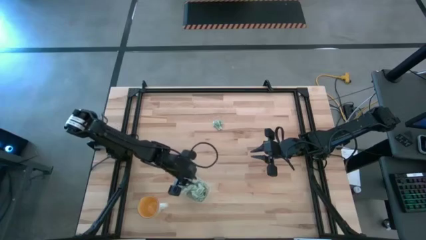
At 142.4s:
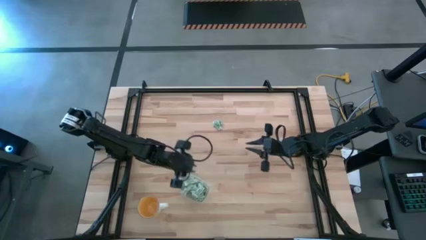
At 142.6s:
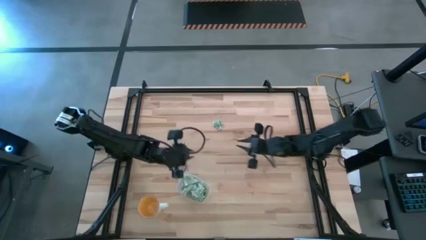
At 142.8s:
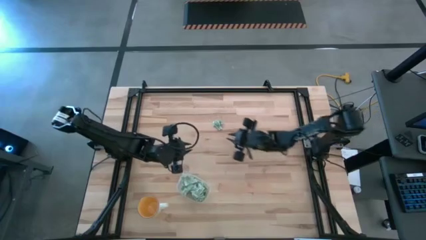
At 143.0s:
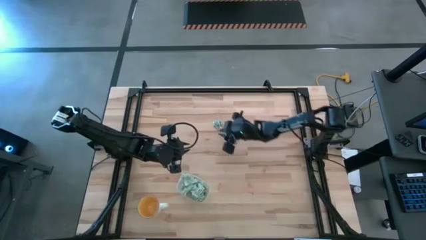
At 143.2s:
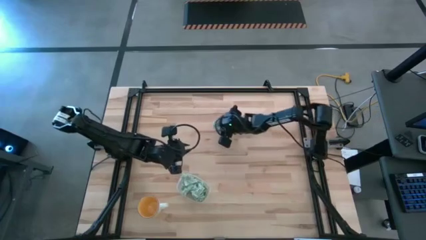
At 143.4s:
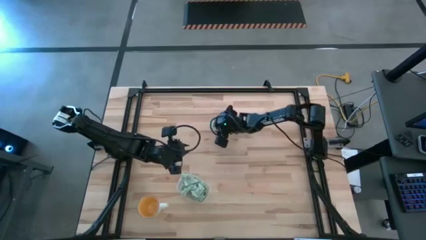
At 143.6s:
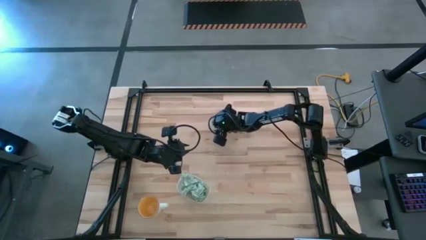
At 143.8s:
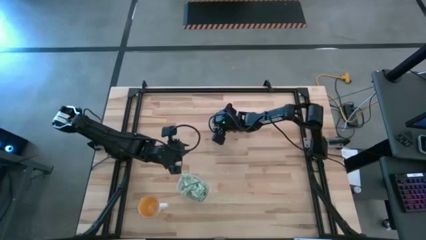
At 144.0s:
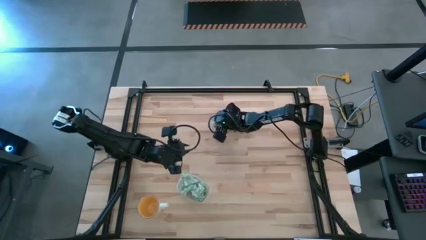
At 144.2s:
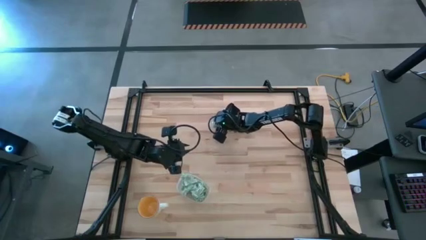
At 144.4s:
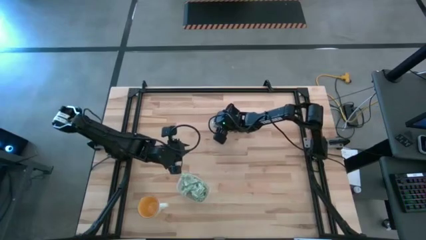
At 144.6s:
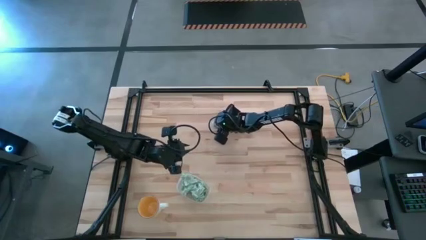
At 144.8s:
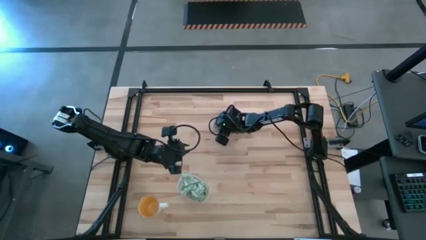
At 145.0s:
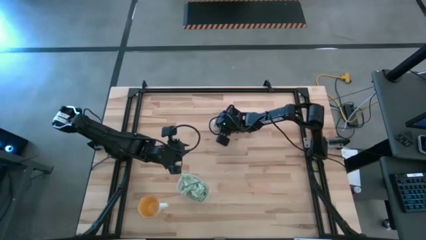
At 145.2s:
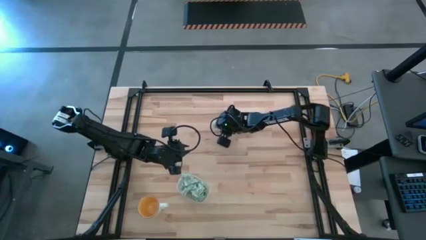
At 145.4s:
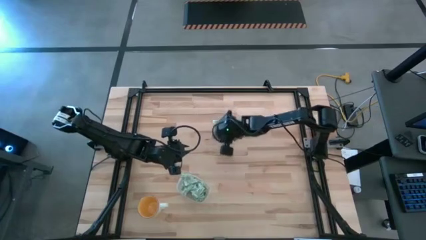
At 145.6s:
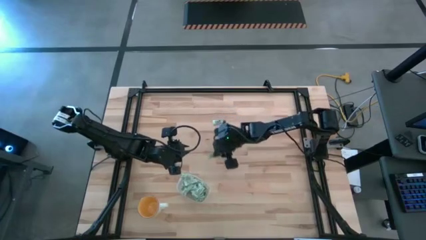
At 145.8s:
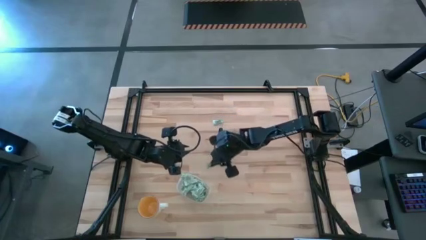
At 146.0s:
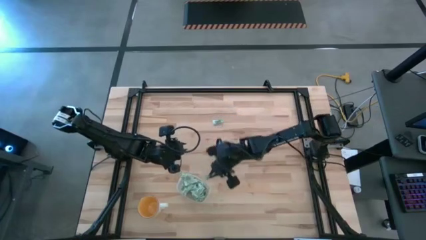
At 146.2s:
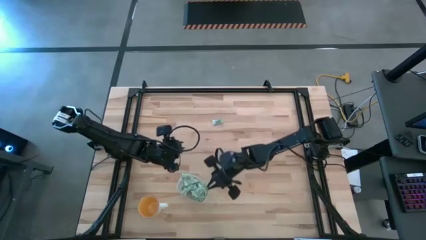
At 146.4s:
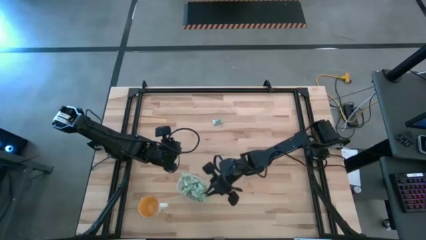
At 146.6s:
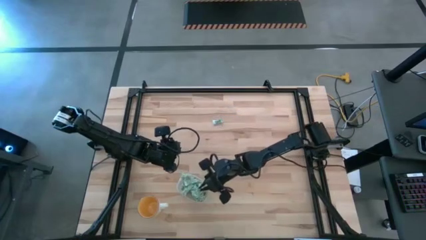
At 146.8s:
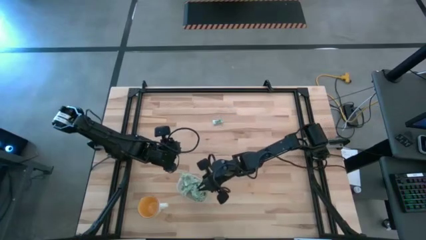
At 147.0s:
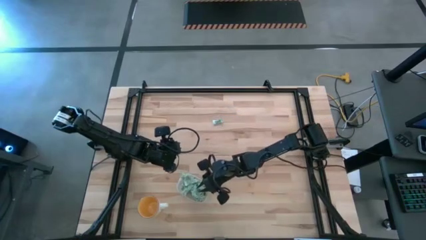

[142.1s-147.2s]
Task: Pick and place Stevia / Truvia into bins
Put the stevia packet into the transparent container

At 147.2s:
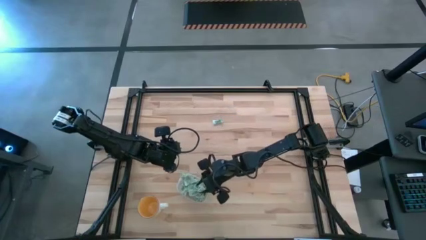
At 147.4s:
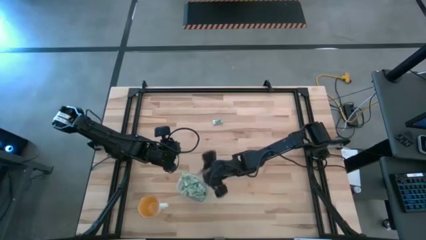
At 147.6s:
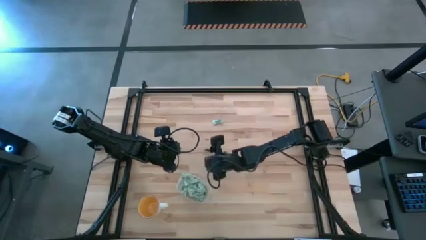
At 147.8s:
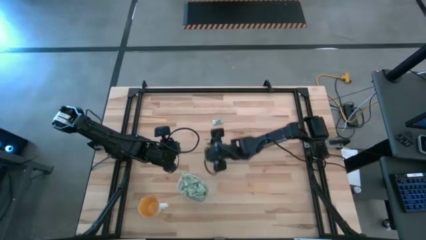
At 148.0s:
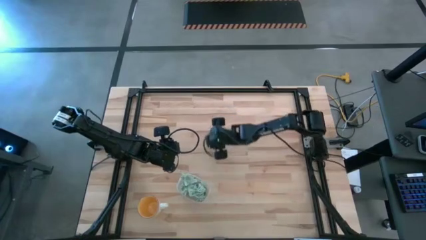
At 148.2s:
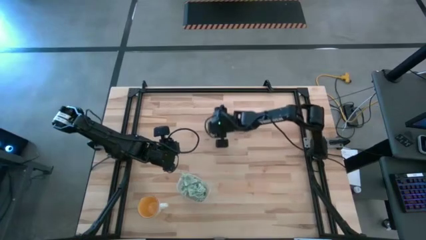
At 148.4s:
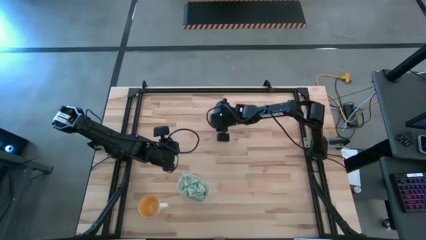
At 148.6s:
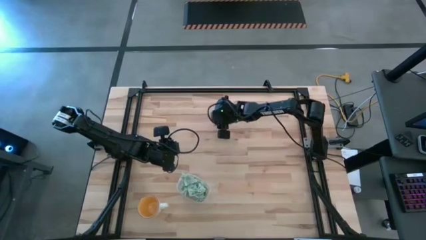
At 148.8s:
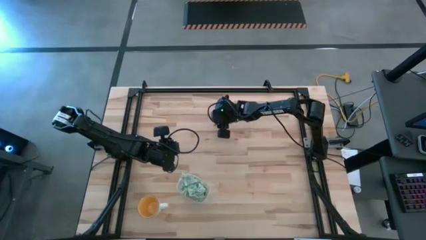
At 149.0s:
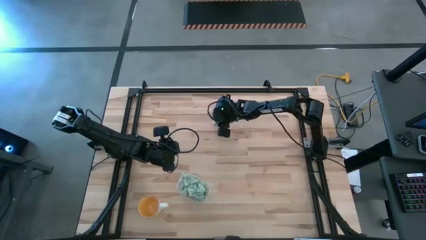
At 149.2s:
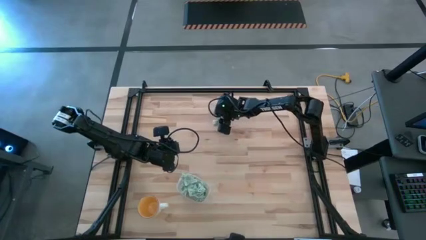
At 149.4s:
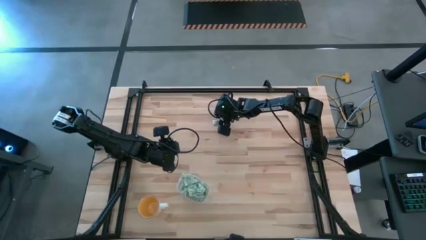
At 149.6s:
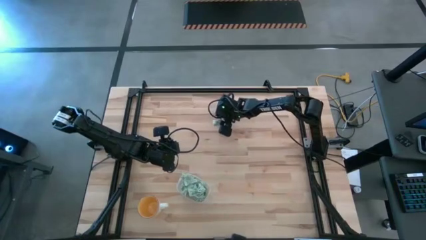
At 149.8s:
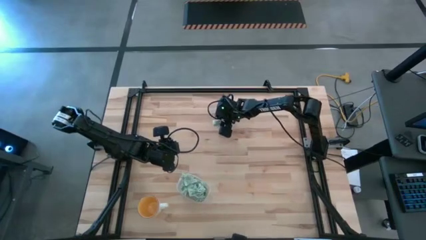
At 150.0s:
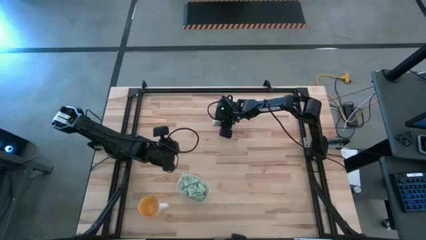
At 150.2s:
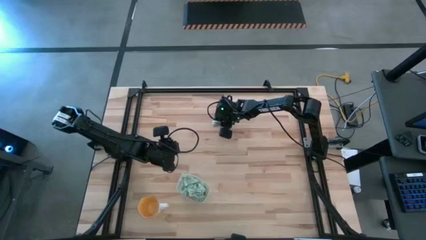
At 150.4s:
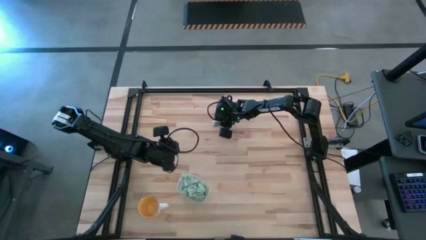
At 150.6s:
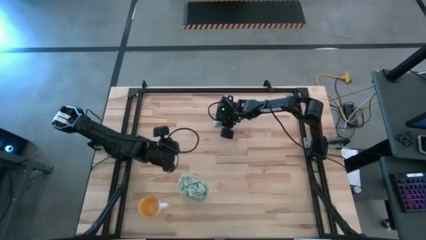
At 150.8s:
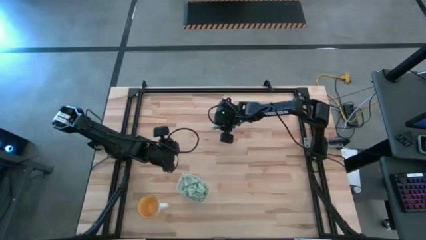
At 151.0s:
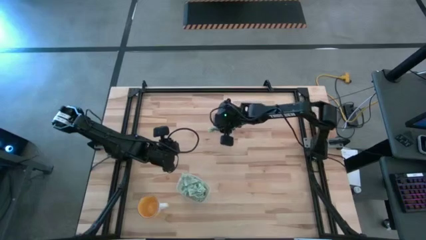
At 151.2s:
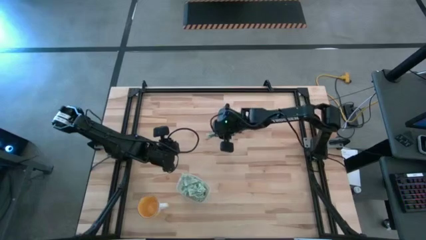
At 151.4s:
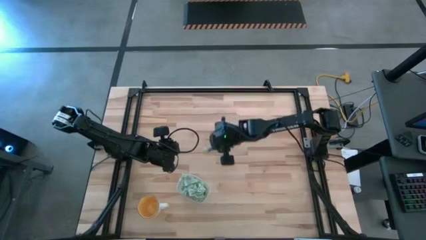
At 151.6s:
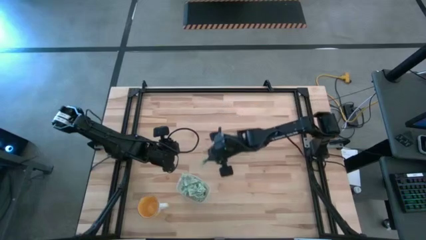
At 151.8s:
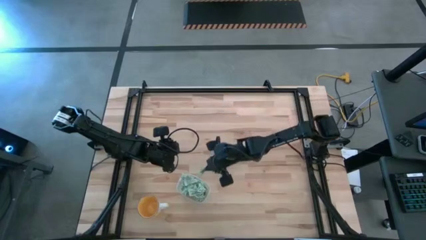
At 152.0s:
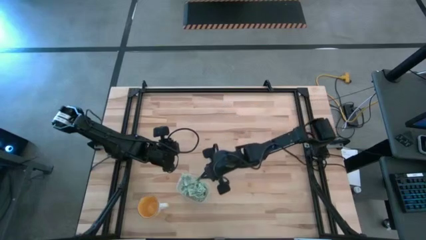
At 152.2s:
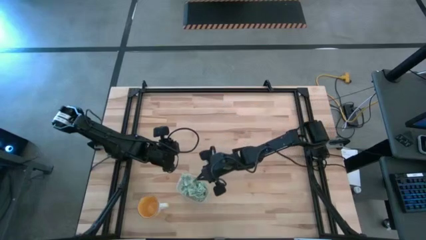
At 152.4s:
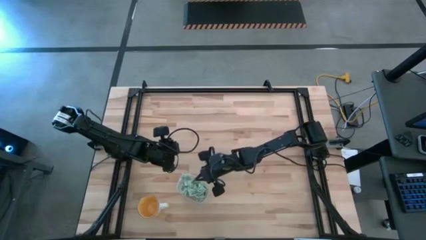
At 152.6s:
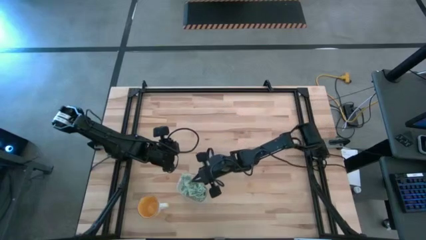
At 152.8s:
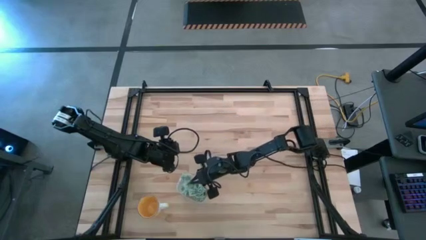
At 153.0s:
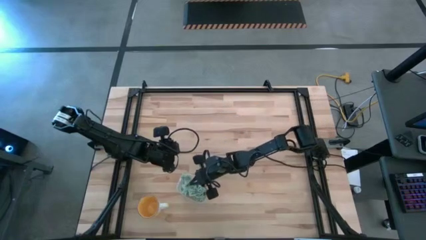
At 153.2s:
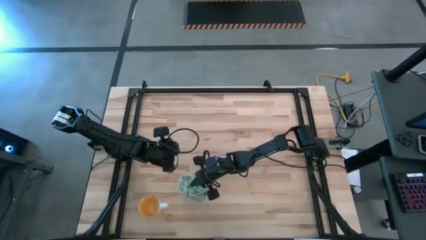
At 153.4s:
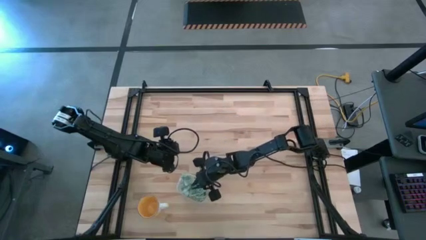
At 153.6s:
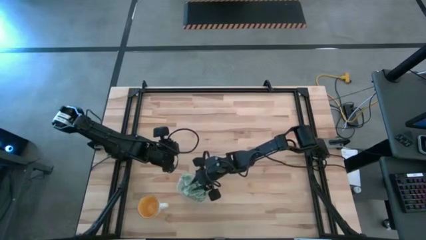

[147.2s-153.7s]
Put the stevia packet into the transparent container

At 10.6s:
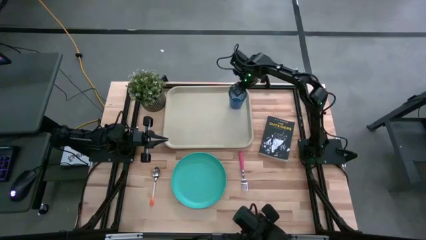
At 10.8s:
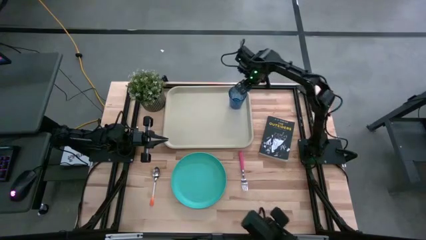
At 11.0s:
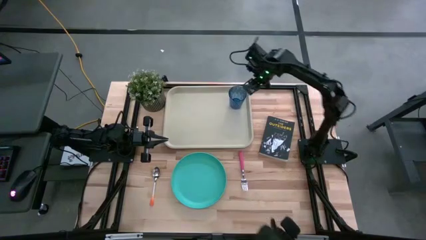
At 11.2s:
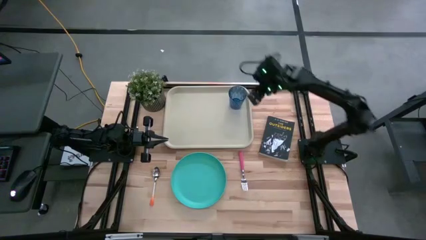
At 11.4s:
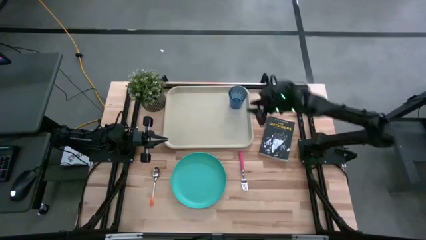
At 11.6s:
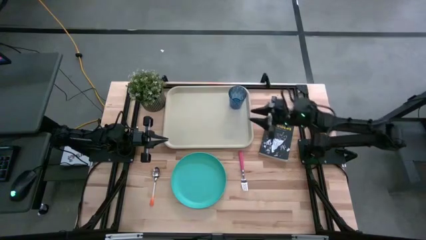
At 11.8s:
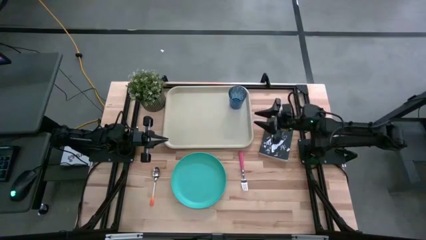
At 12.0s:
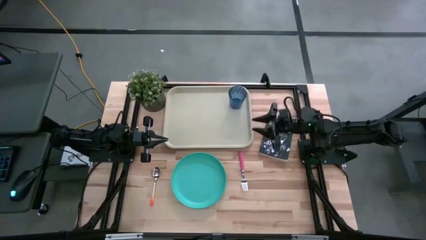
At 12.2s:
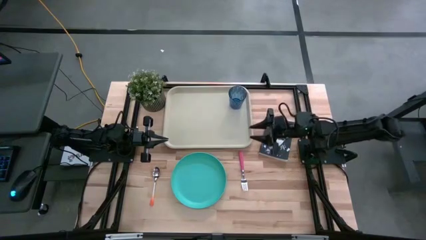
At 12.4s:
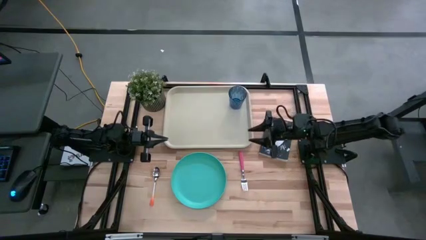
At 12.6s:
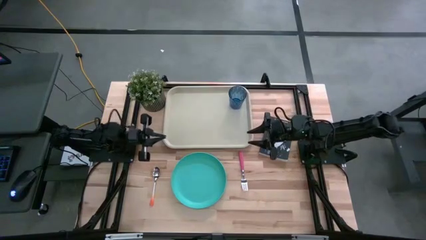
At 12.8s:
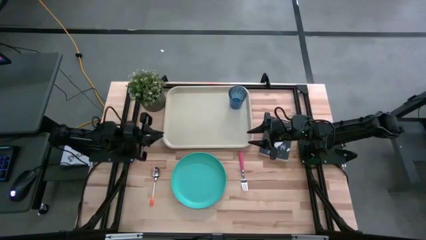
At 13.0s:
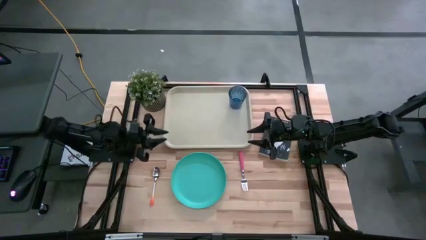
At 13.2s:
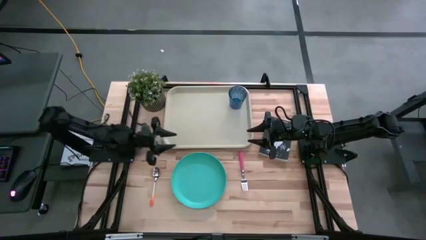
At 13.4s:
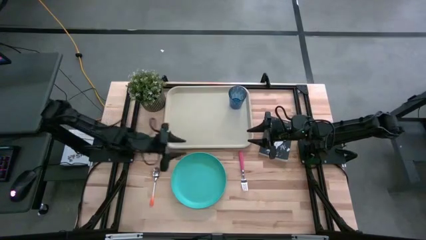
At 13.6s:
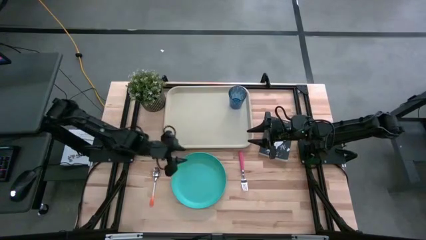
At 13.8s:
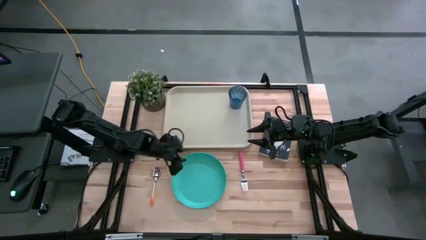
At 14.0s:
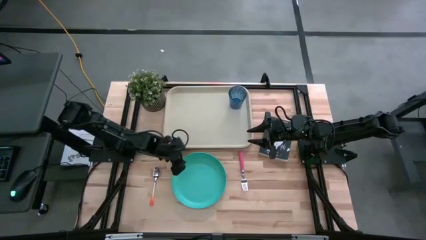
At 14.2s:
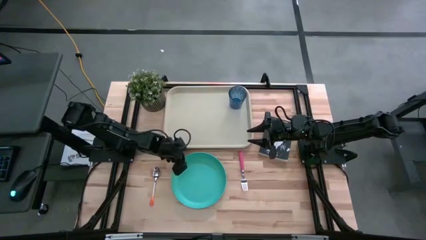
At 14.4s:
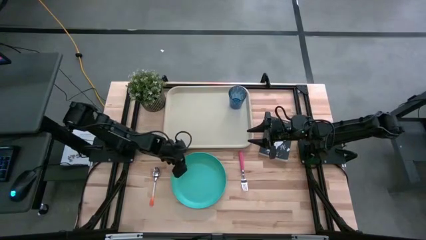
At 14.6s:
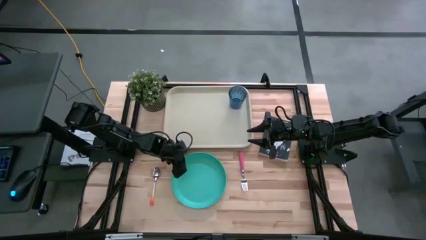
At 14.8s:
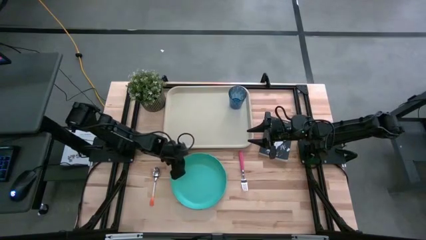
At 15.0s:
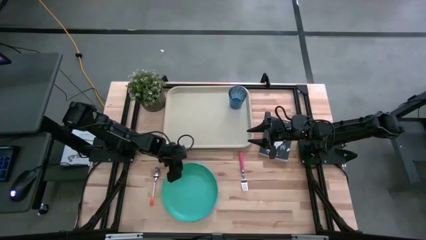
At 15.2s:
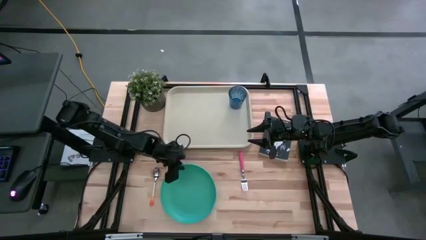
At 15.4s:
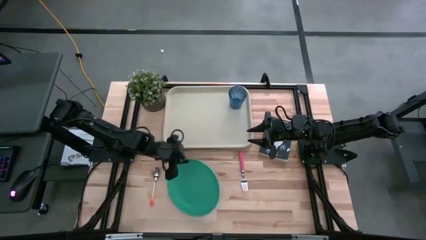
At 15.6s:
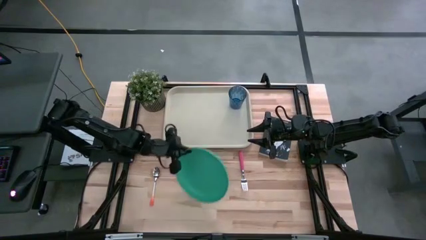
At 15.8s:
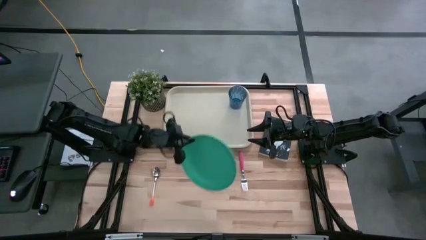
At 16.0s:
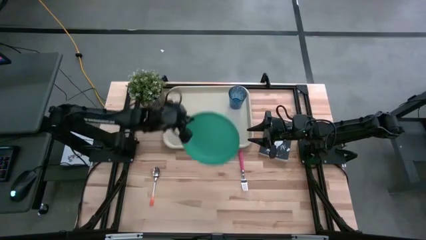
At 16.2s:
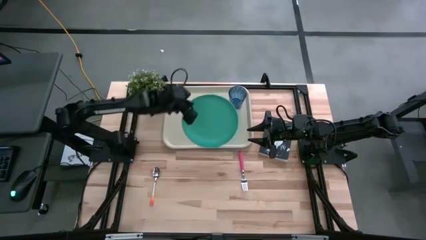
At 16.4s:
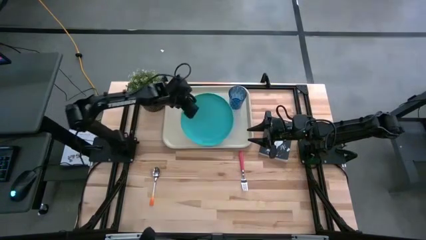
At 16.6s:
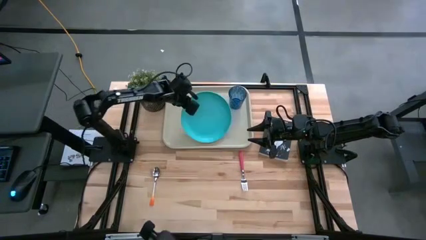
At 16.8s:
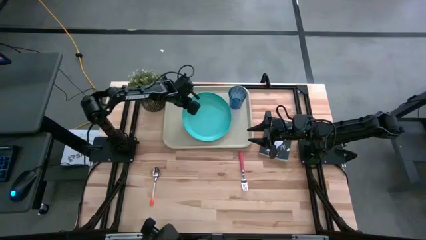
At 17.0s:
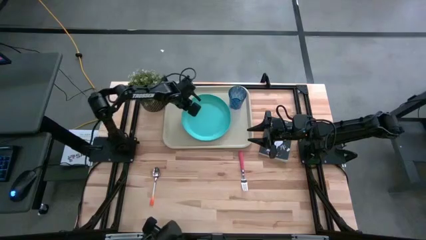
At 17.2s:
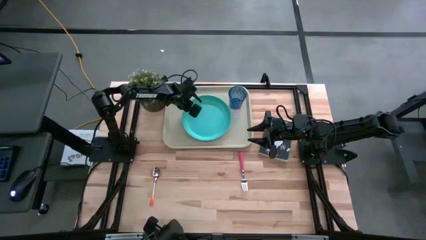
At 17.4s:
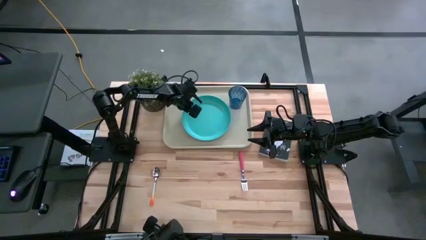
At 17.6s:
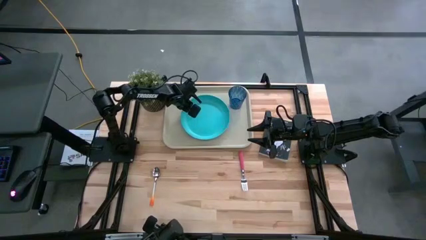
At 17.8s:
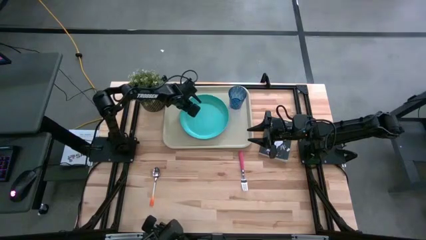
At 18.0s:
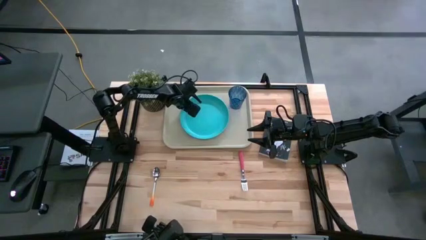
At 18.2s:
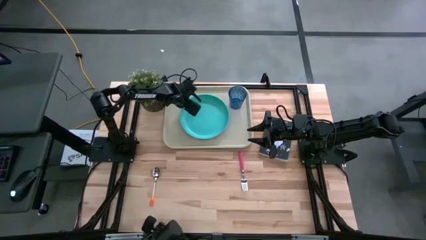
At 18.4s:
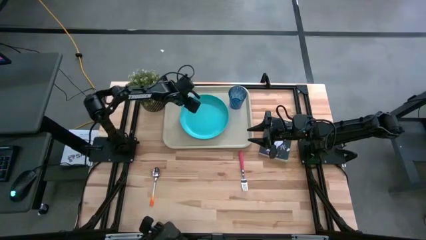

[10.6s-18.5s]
Task: Pick and place plate/cup/fork/spoon on tray
Put the blue plate on the white serving tray to the bottom left of the blue glass
